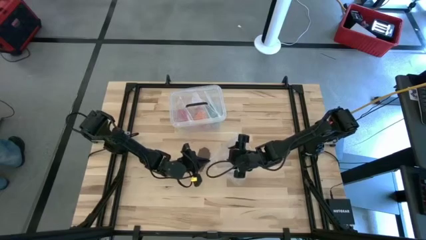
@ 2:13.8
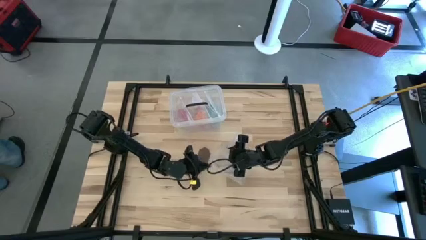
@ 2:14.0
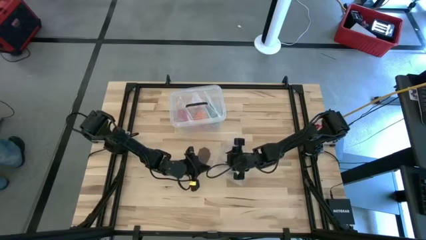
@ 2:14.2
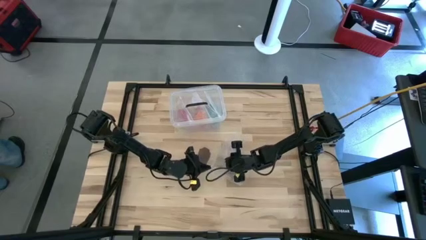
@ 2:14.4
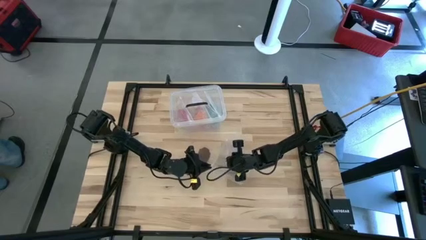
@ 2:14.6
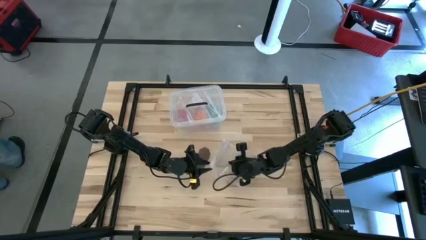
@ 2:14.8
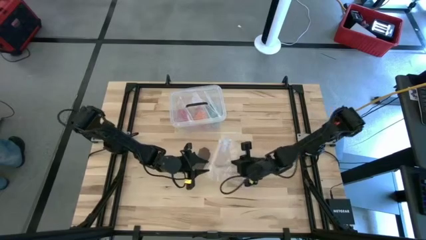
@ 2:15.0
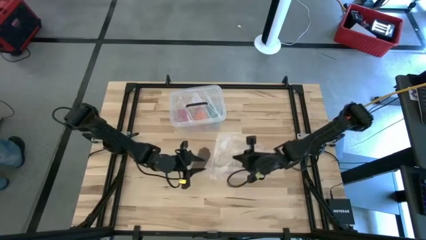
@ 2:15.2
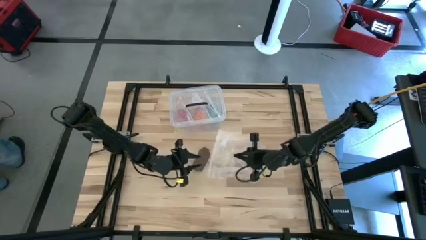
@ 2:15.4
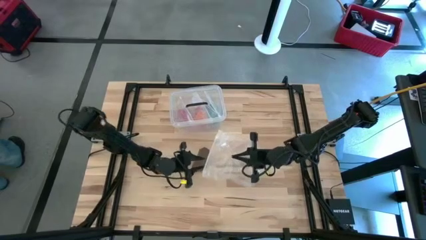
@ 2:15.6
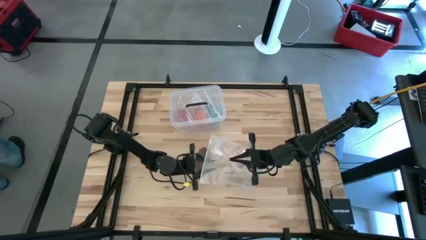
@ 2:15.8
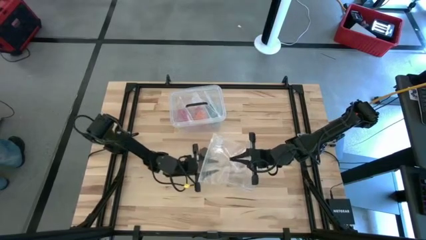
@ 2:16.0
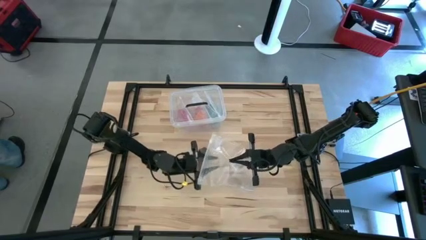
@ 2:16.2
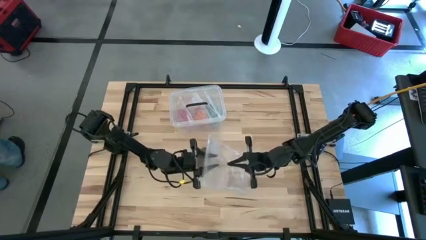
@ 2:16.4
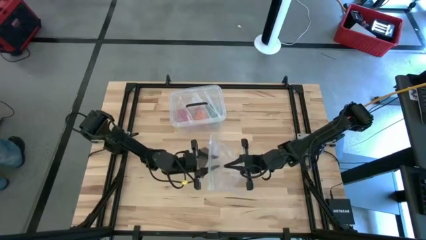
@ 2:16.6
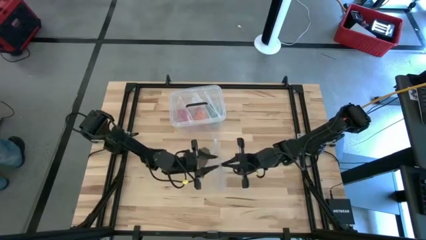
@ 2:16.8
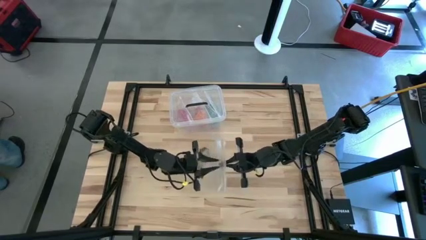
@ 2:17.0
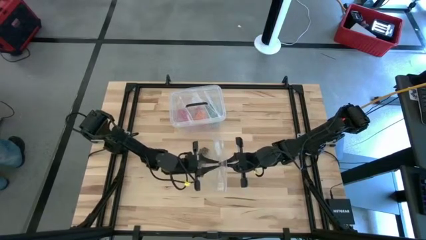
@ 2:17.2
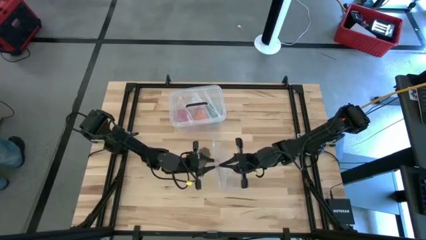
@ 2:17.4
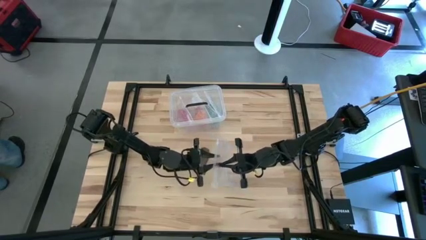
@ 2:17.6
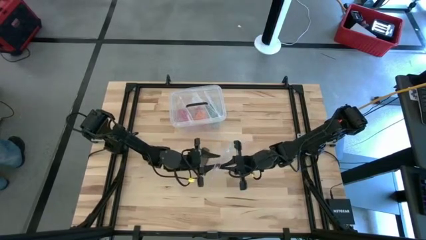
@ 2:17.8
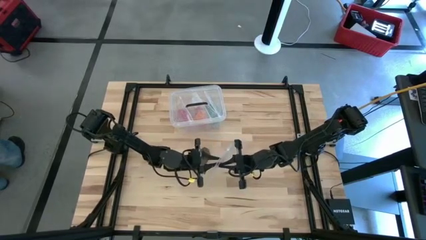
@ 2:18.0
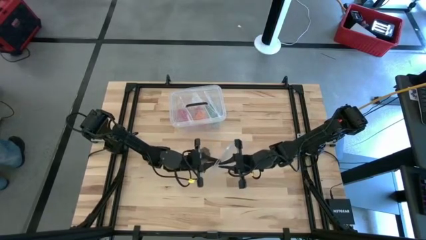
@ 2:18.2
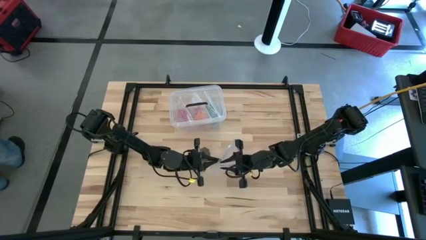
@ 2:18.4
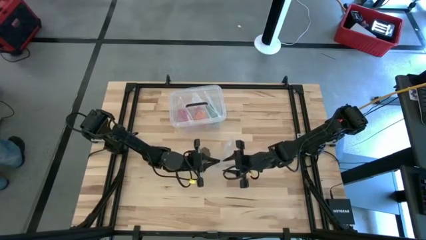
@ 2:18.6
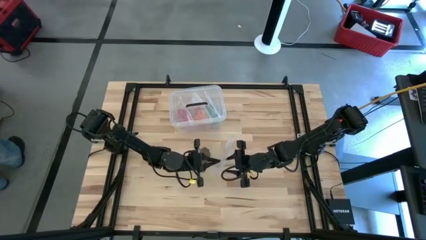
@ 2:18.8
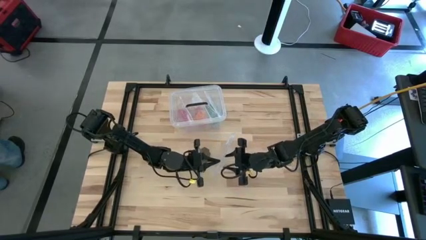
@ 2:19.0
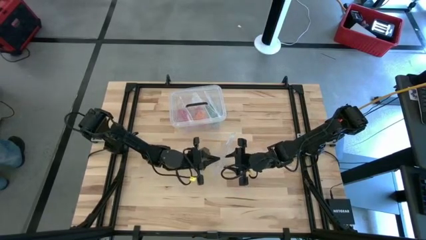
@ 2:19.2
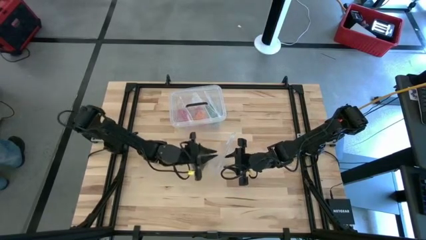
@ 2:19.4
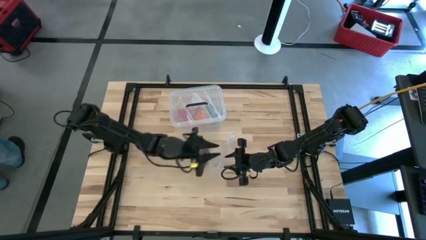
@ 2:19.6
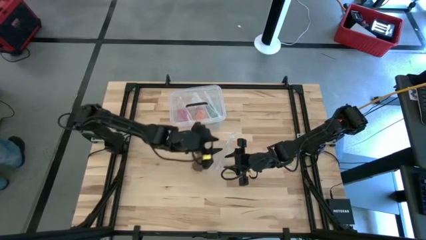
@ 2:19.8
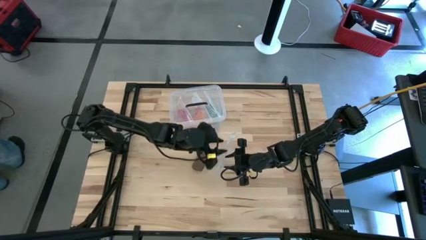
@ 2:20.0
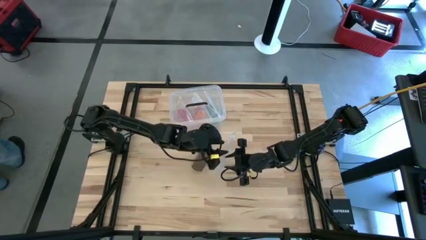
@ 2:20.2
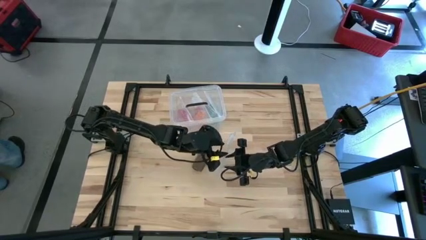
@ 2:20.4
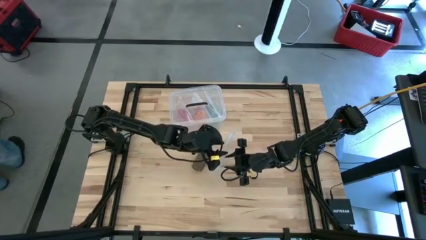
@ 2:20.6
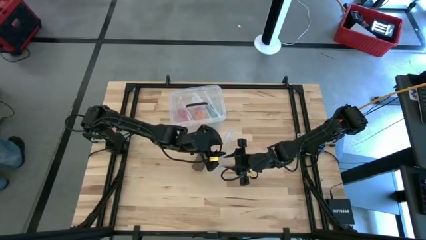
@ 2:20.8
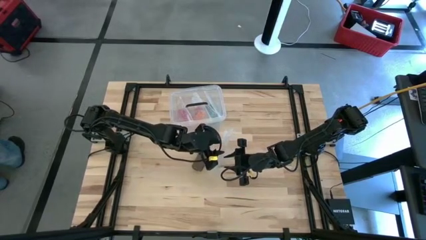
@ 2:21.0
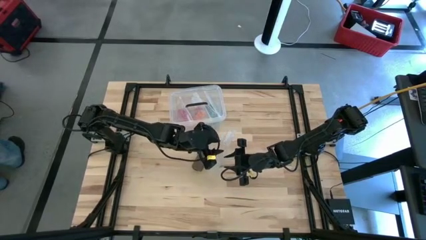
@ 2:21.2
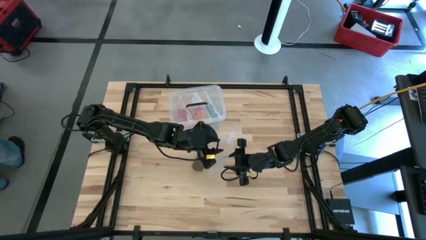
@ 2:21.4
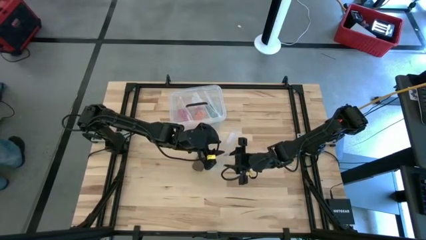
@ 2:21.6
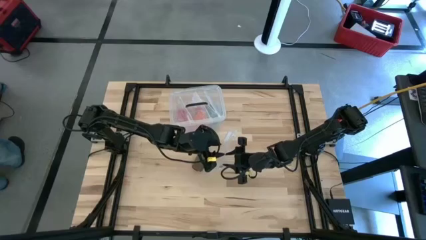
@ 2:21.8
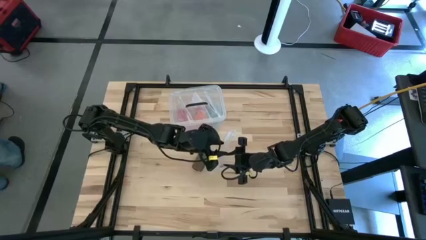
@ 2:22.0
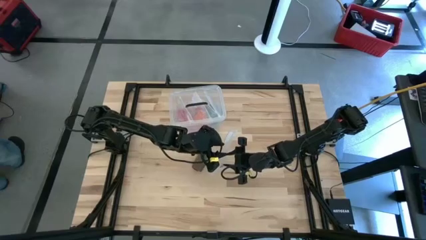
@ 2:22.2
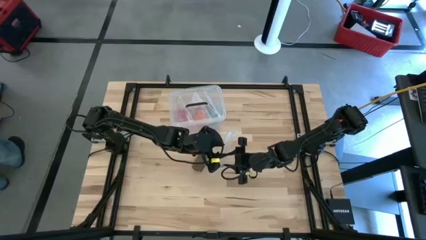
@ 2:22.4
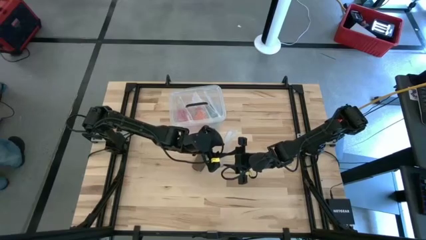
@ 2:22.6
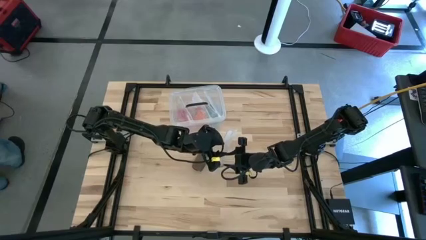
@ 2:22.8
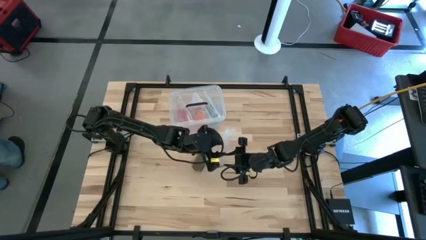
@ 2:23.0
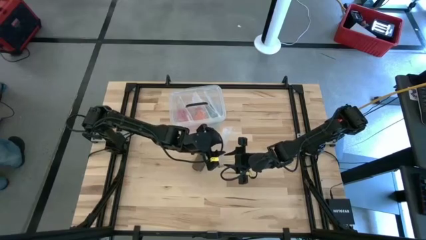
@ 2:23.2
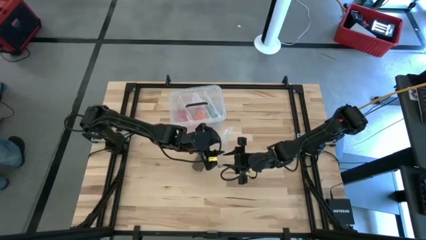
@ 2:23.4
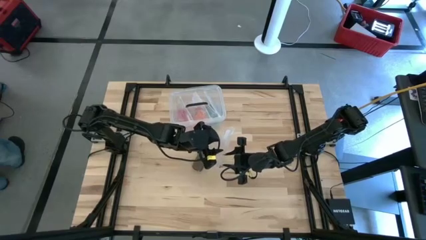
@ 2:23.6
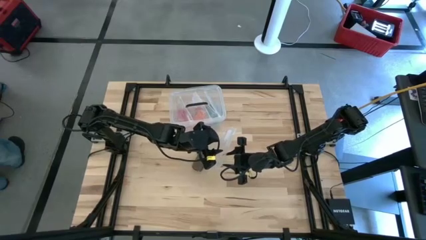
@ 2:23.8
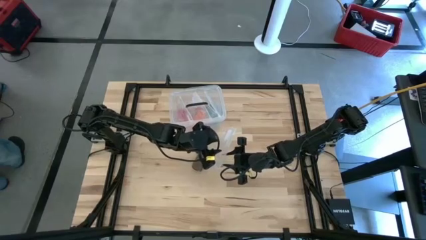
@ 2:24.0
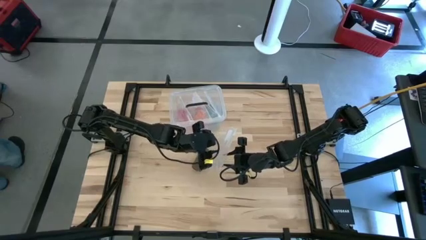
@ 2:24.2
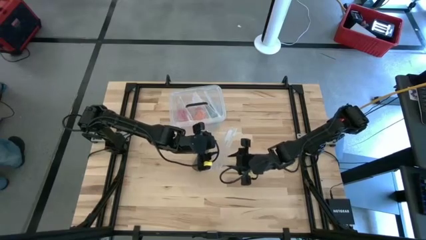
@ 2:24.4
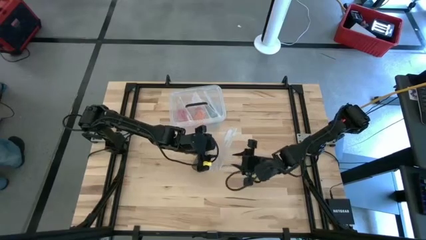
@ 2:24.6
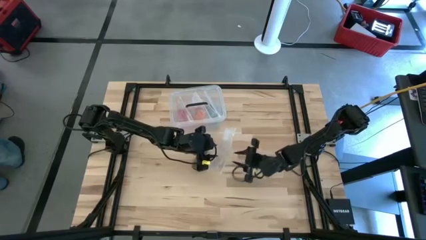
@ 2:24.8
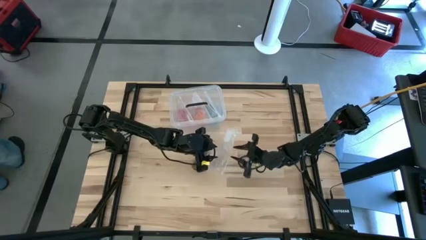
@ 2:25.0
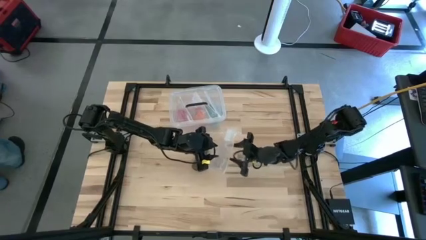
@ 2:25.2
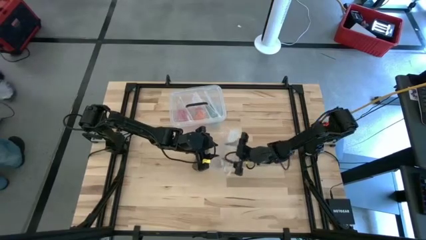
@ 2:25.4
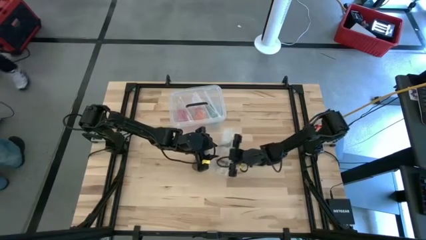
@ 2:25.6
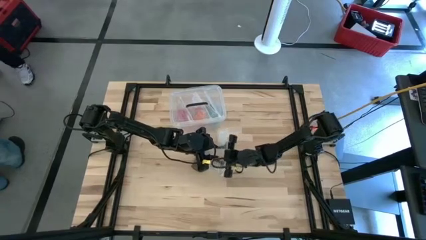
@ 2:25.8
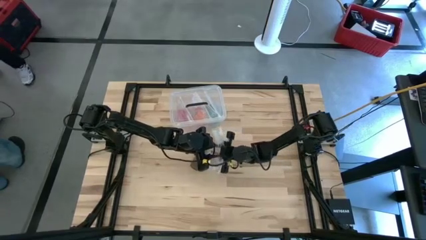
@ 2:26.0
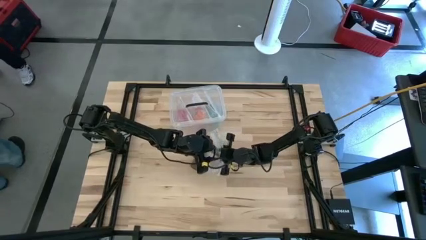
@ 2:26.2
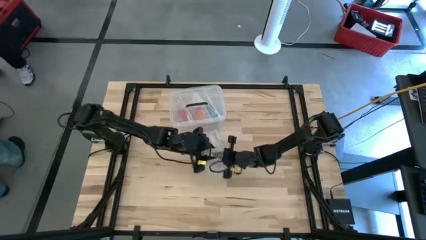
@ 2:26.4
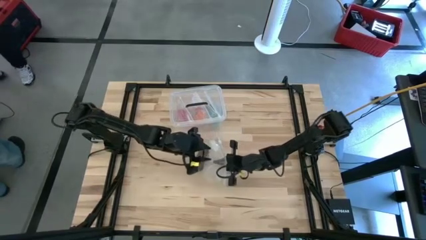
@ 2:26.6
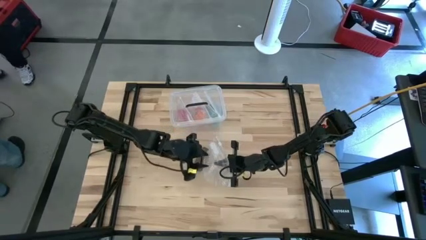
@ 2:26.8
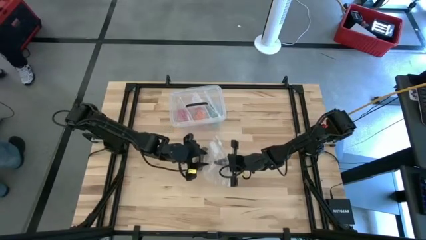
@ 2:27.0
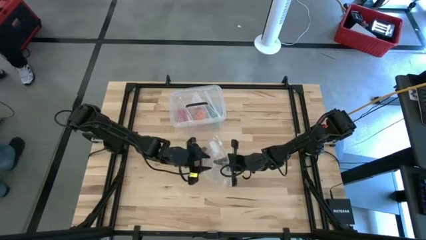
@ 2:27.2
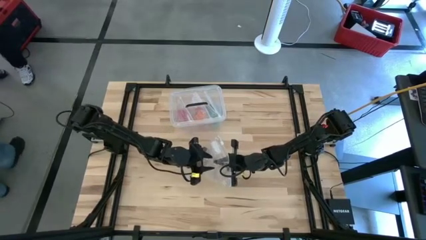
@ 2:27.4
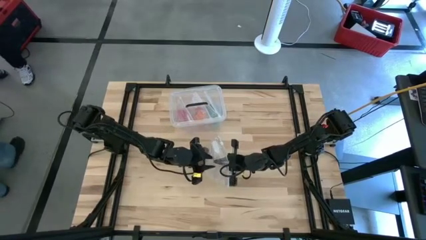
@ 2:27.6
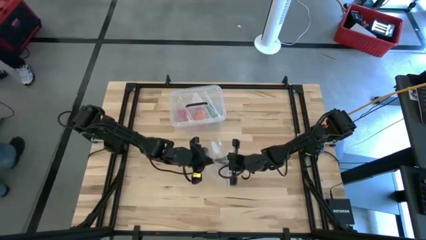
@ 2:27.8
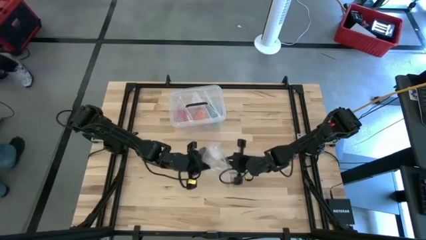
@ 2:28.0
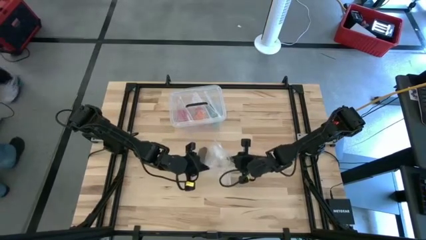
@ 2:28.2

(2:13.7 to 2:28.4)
Task: Roll bandage
Open the transparent zip bag

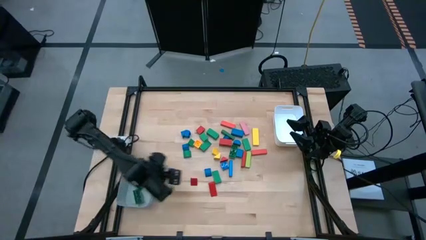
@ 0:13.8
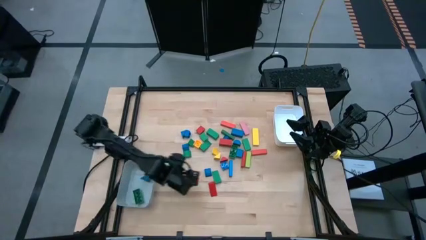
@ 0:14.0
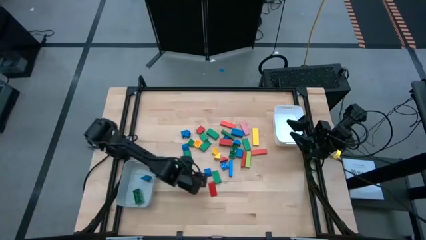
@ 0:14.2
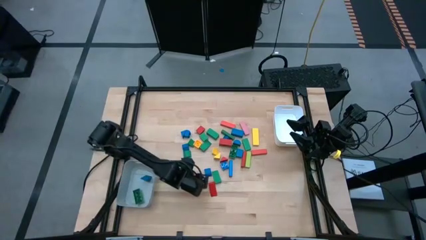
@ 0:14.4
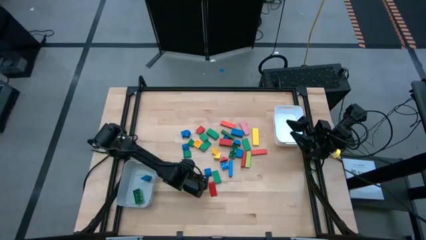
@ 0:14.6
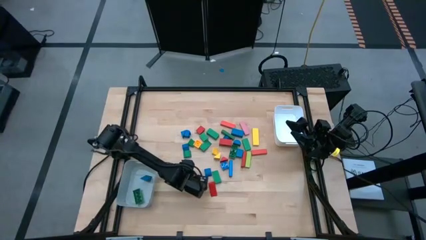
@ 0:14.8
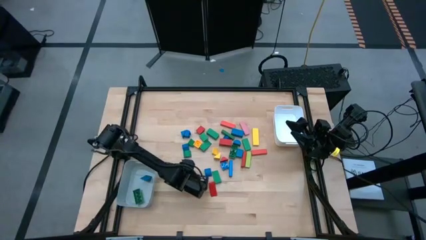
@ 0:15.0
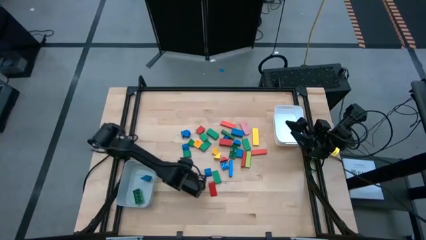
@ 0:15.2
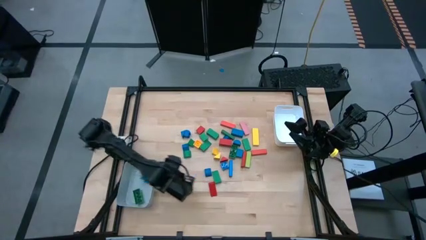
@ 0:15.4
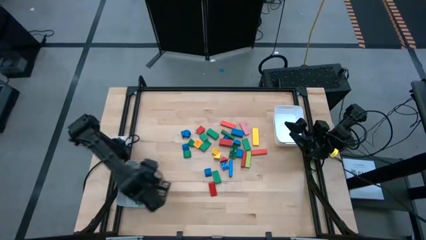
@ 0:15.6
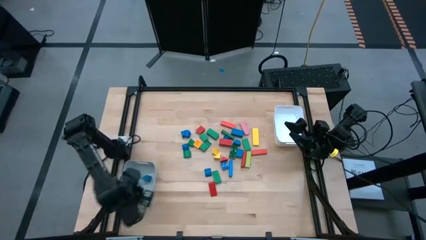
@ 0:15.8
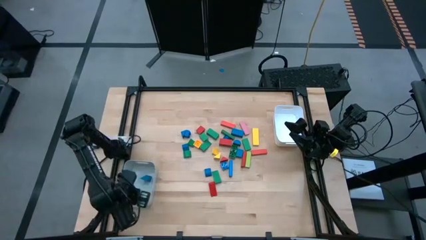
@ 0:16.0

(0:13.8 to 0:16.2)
Task: Sort blocks by size
Put the orange triangle block into the gray bin
